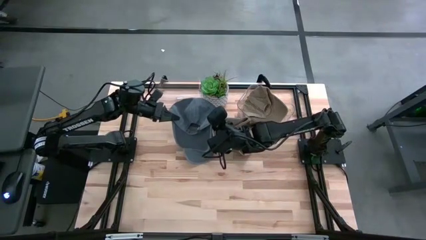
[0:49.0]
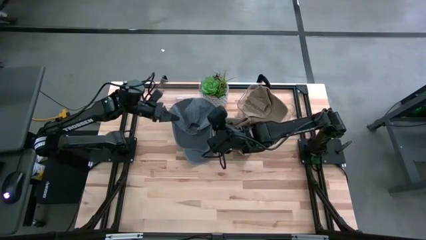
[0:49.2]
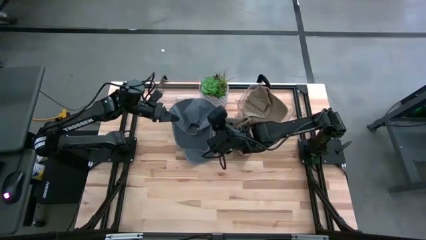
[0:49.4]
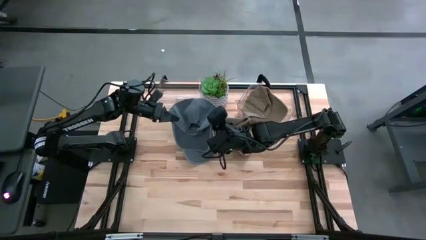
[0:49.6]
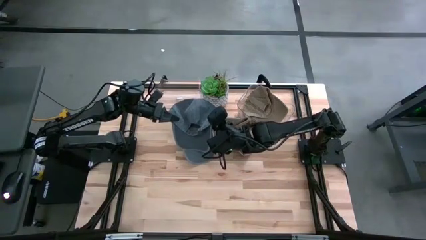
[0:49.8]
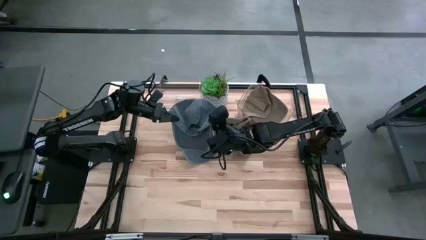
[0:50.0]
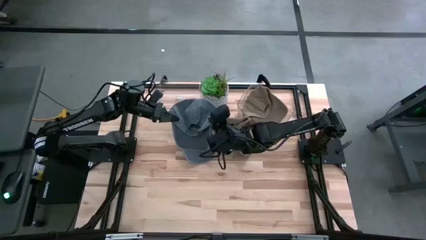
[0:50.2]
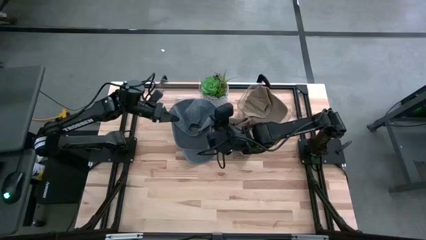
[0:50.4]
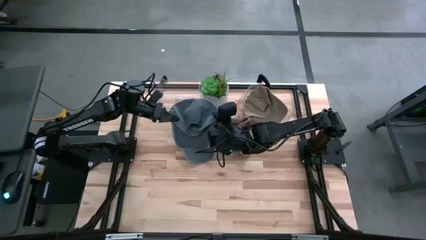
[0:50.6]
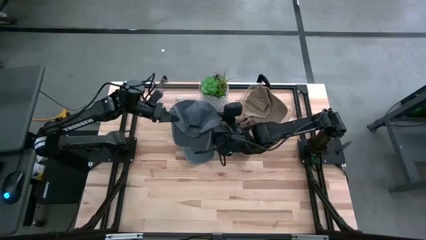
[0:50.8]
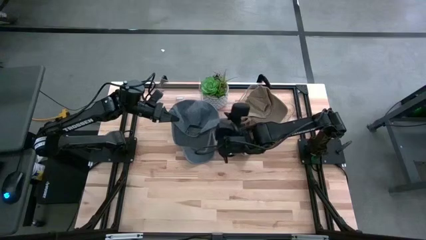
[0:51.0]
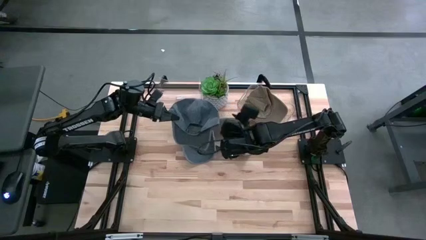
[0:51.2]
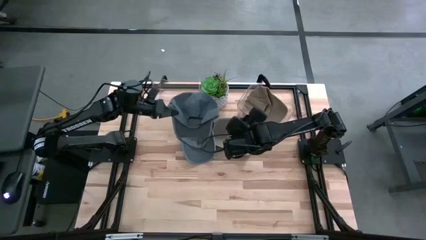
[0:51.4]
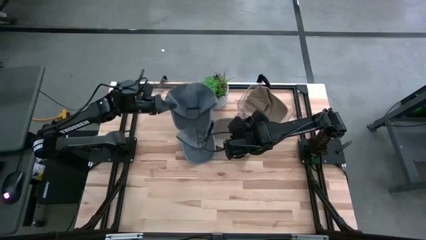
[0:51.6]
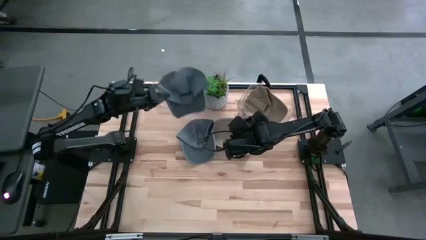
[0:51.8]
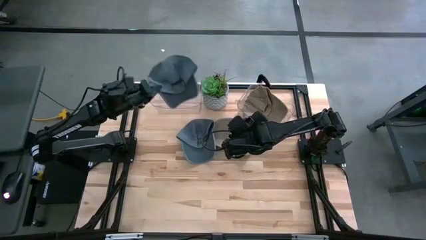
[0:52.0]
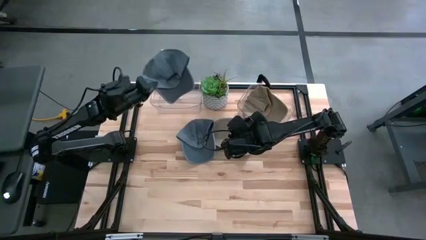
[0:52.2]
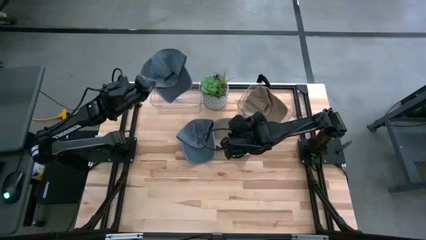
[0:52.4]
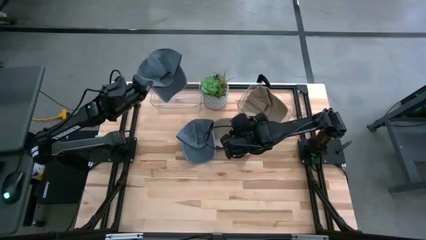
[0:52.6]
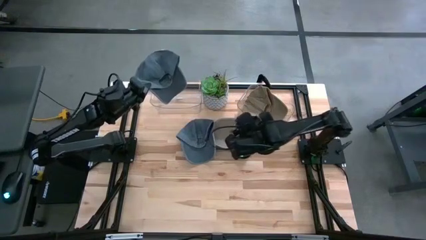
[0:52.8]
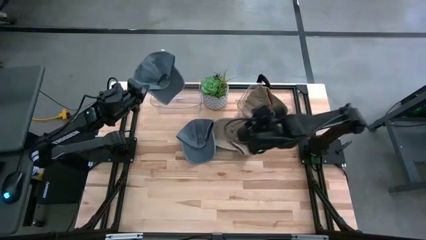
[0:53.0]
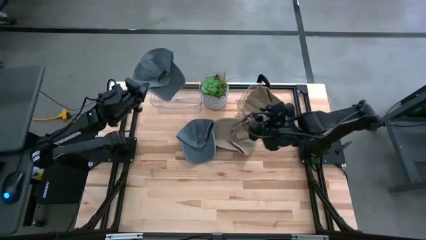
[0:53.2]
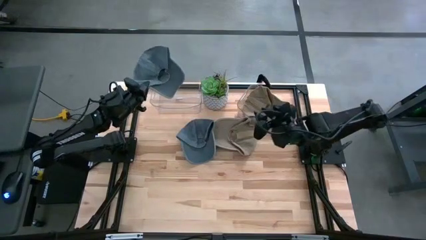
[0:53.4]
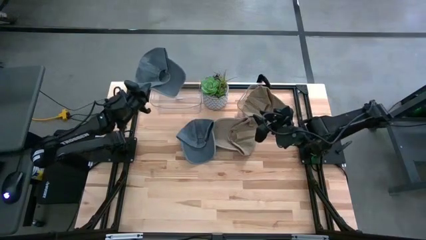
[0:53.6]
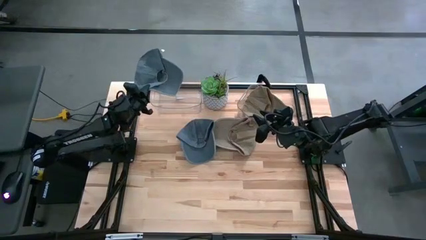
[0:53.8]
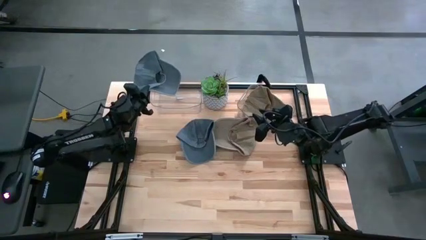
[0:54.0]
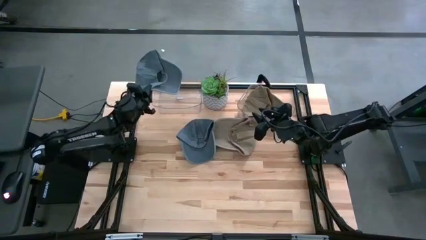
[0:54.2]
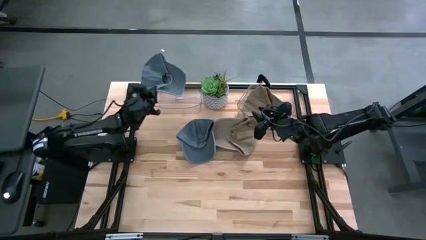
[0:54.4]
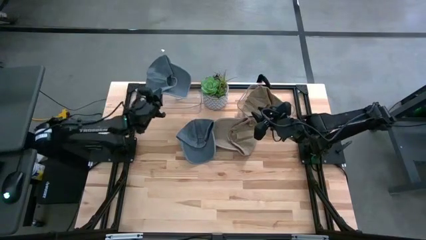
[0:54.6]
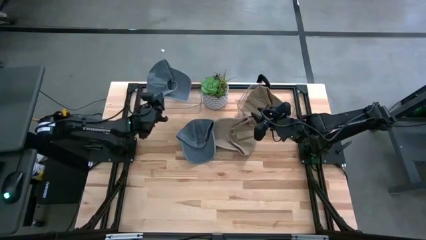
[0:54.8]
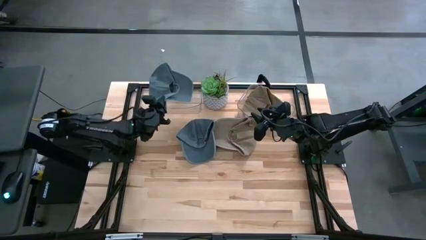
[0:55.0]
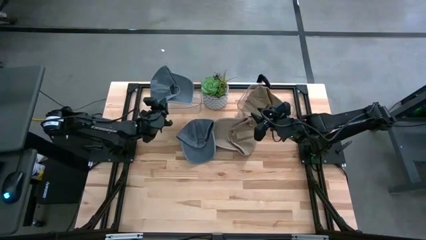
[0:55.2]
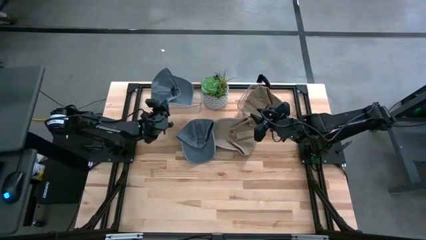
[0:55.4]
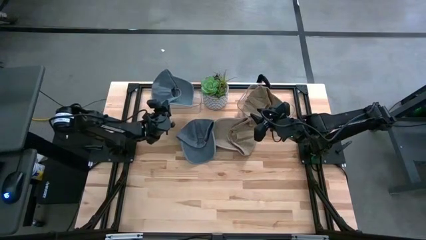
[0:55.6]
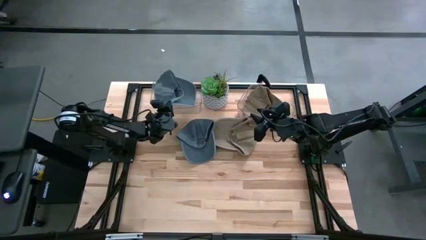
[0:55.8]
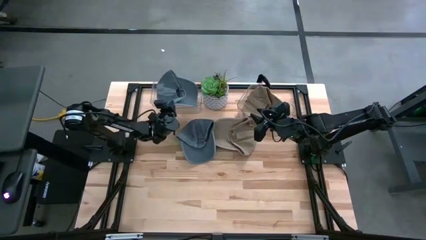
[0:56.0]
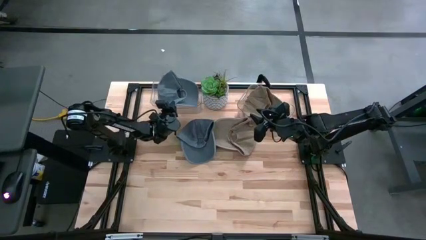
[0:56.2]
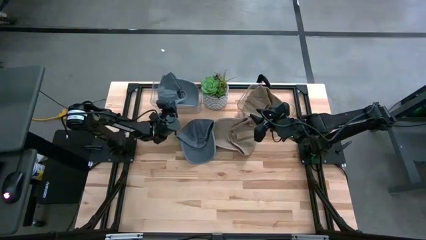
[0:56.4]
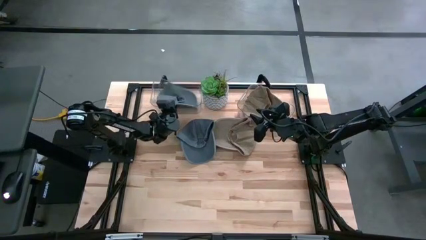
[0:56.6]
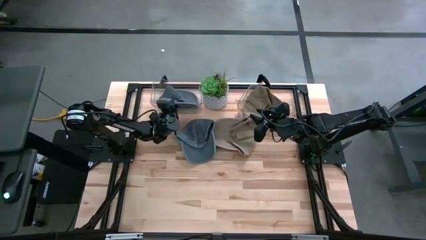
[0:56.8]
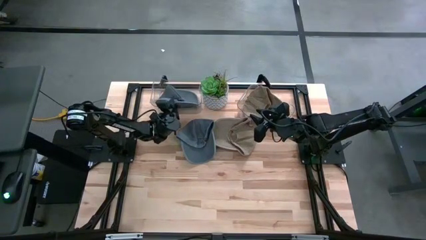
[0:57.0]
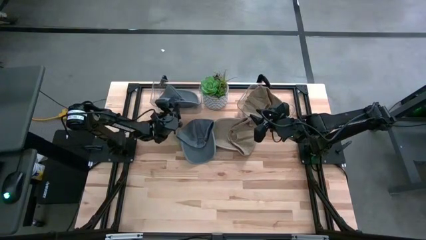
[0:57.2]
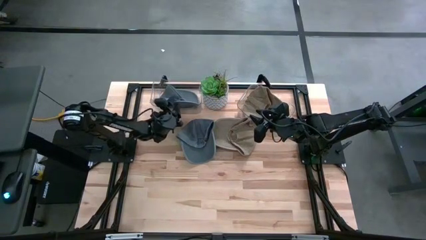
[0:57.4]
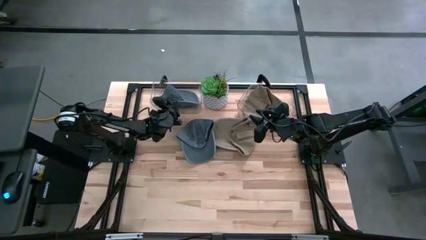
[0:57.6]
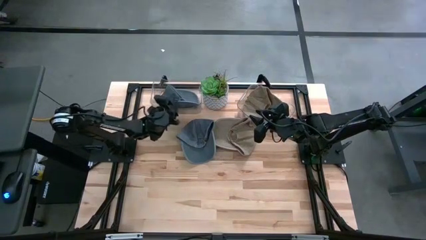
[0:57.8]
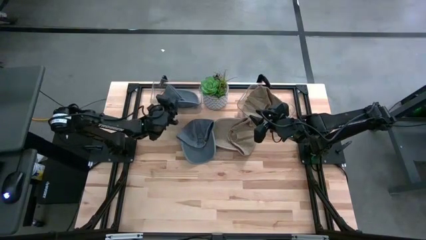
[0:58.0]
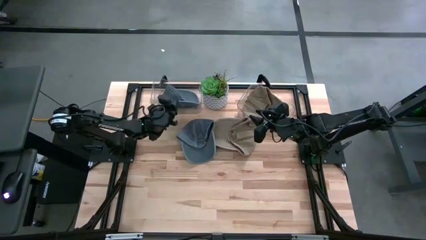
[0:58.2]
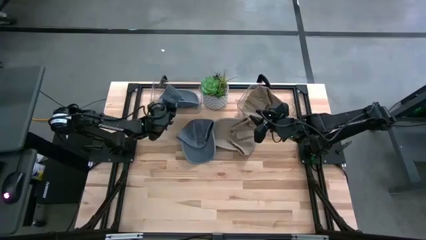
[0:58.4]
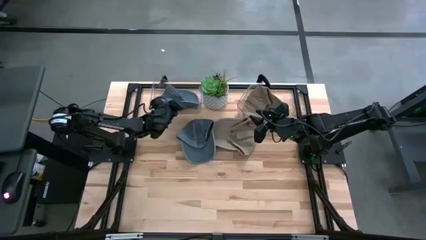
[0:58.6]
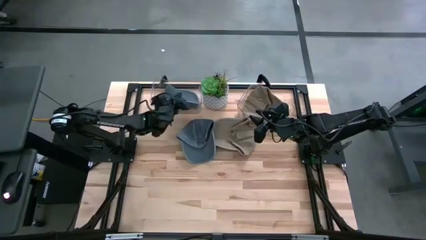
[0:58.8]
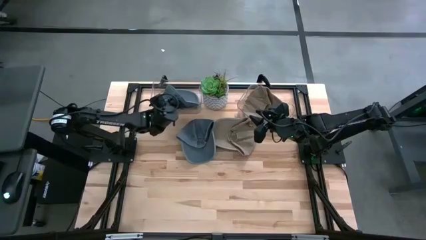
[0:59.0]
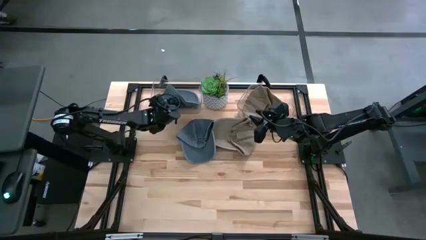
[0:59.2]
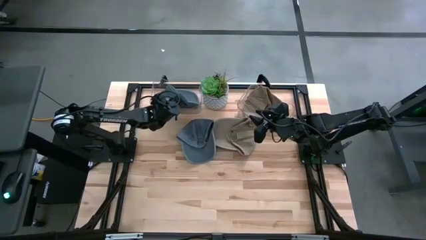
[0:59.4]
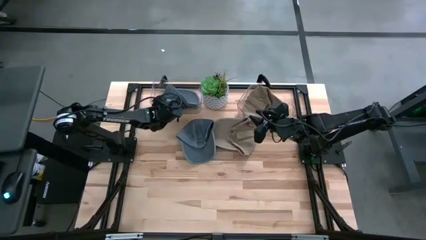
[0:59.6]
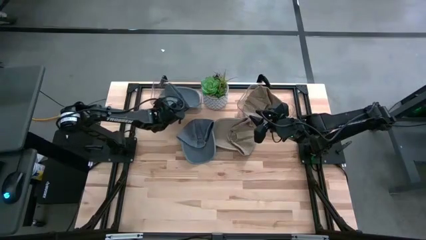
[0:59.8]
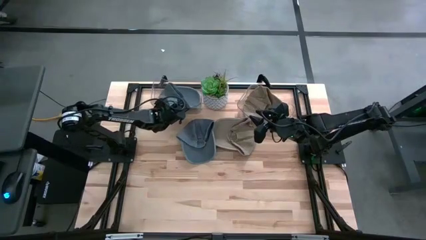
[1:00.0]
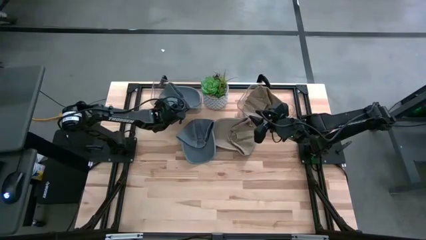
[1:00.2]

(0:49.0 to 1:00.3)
Task: Pick & Place hat
Put the right blue cap into the left transparent bin

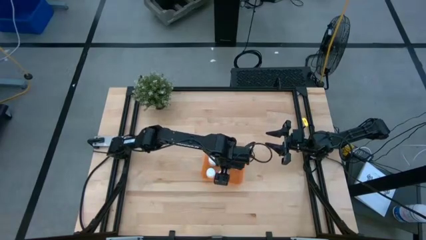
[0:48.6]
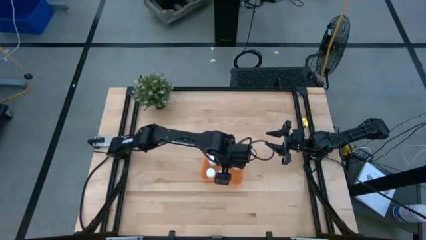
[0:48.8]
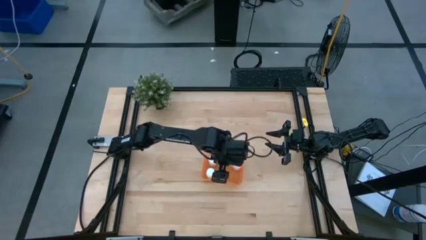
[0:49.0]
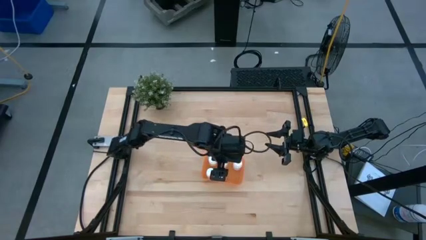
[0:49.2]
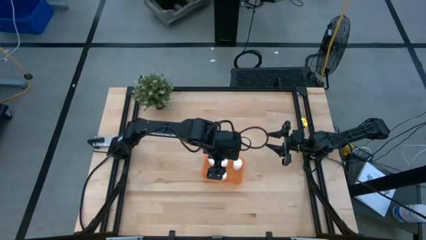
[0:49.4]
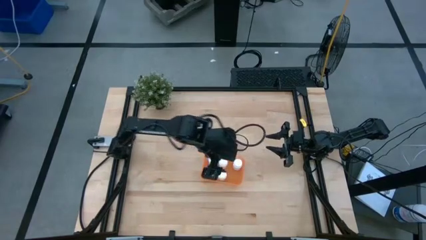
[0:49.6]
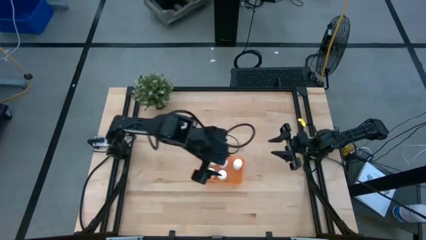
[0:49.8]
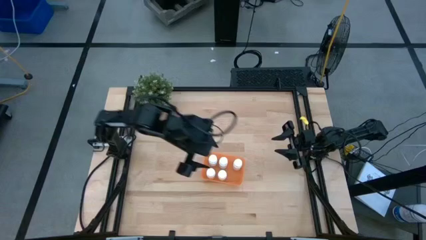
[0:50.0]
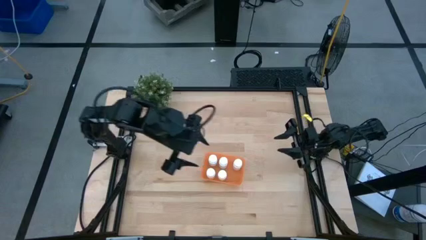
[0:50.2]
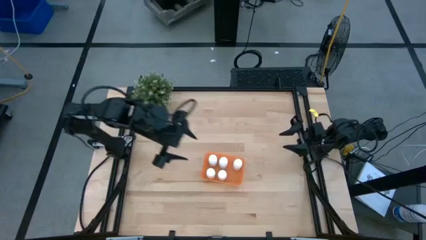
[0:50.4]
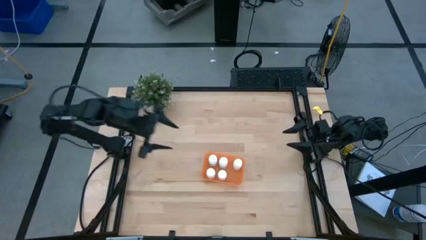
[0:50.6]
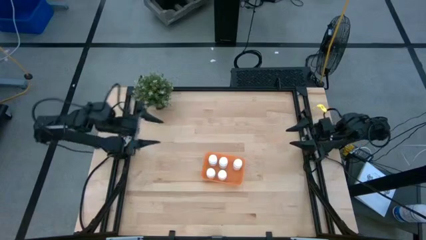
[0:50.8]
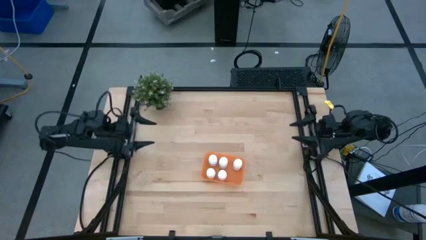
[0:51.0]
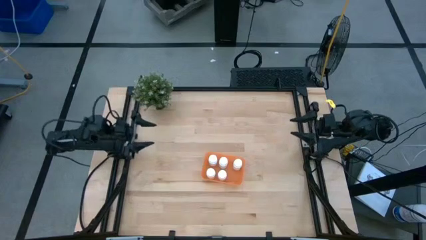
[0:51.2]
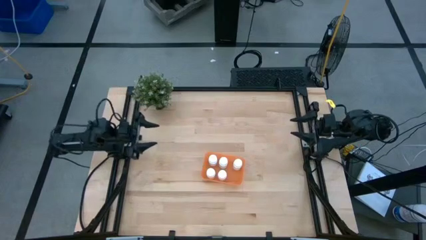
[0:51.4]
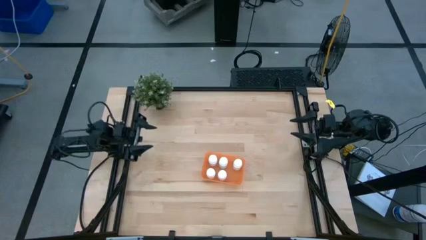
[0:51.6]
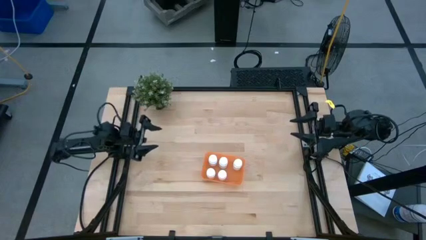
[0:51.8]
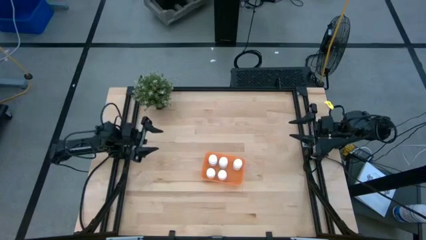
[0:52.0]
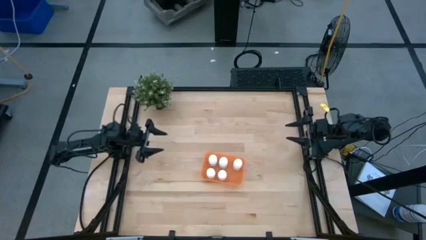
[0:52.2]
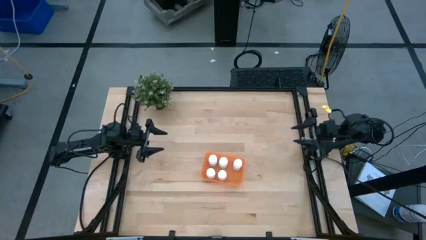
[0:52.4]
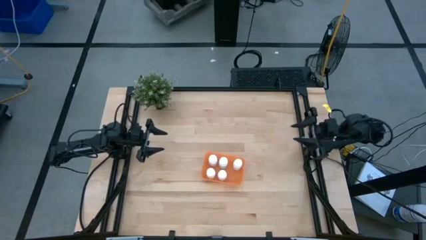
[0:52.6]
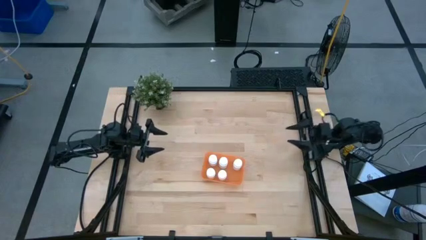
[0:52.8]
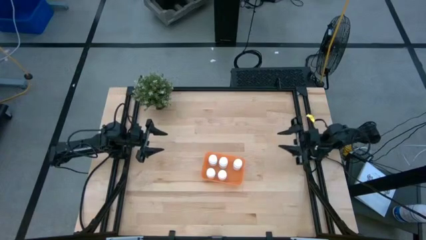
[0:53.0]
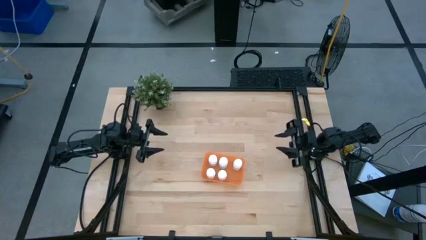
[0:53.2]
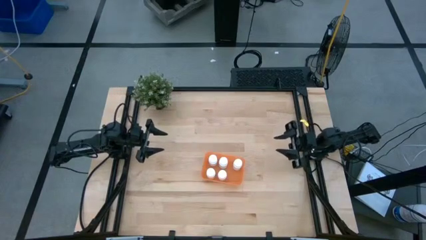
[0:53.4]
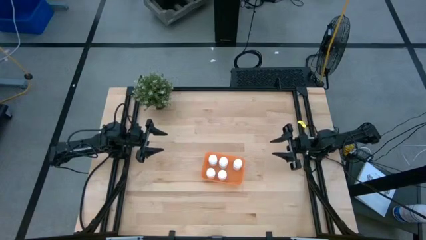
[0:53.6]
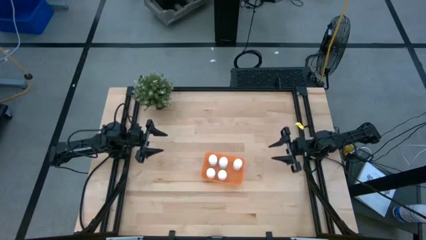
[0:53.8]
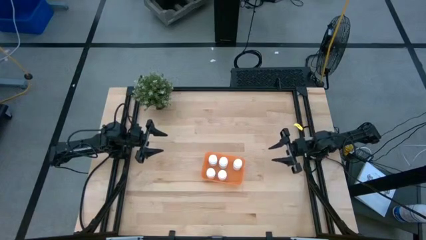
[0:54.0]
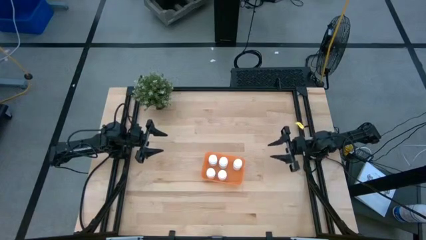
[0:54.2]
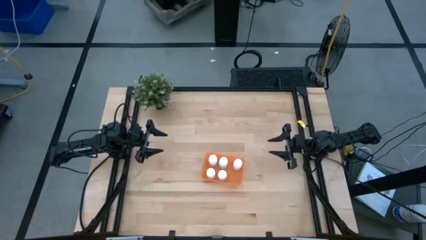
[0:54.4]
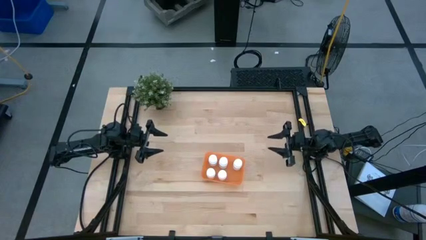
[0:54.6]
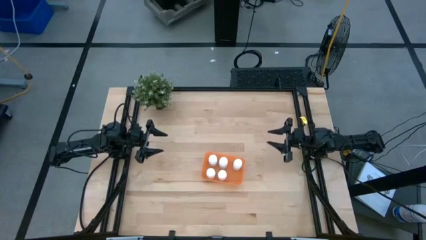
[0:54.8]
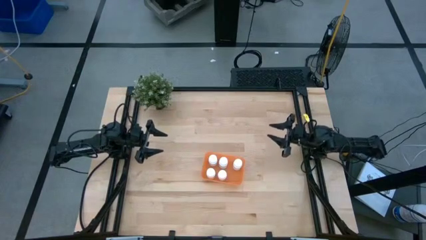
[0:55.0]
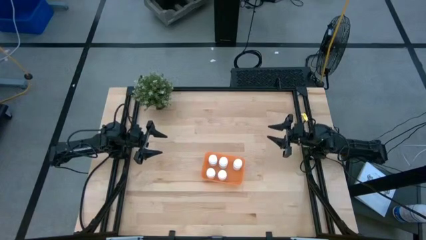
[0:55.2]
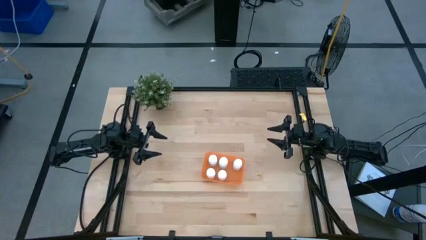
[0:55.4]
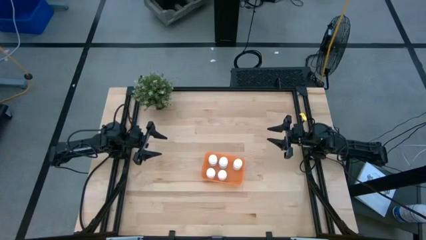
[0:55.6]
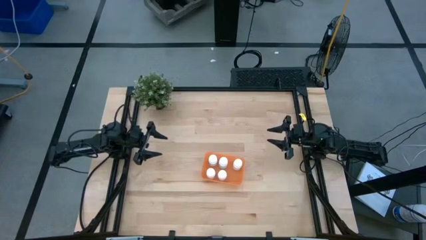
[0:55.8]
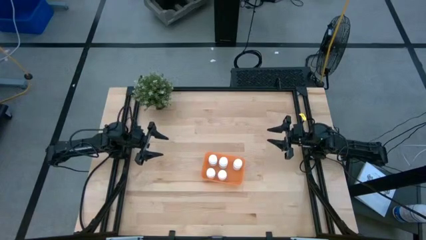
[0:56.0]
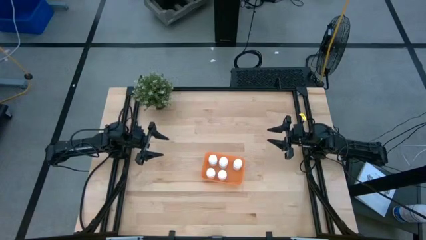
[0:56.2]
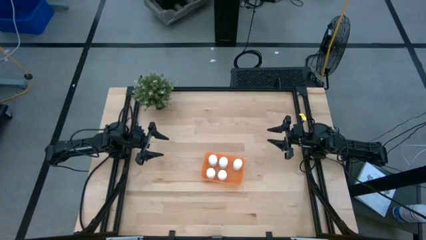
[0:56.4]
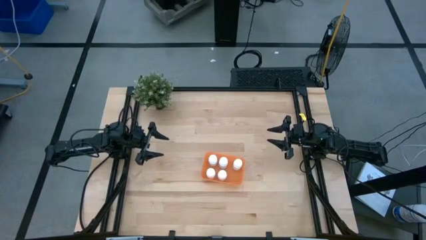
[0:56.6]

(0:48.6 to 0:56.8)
Task: Pick and place pill bottles into a basket
Return to Home Position
